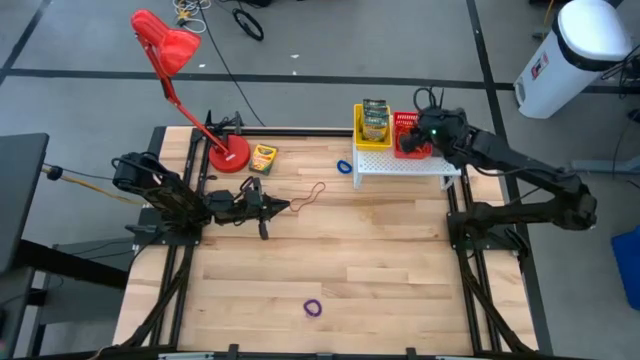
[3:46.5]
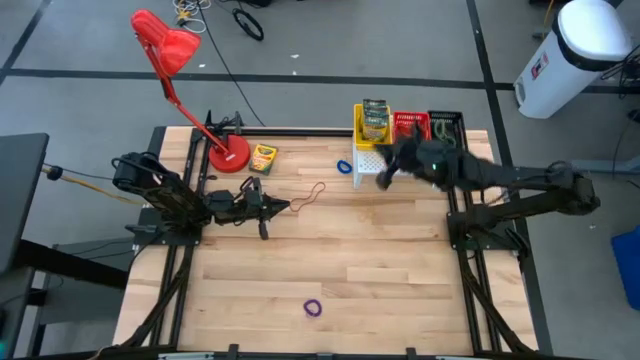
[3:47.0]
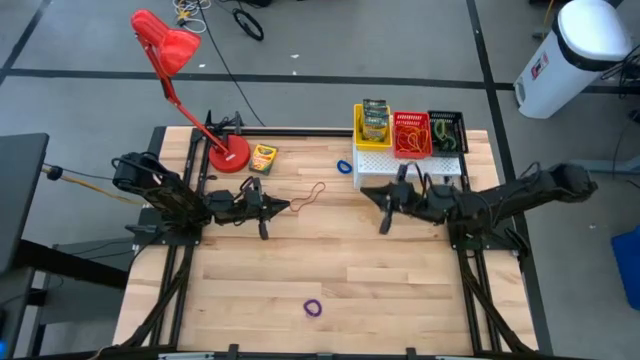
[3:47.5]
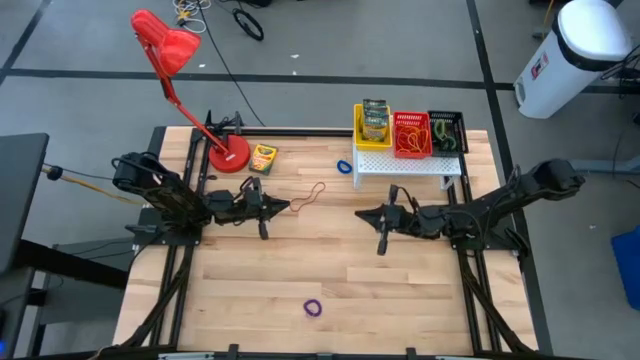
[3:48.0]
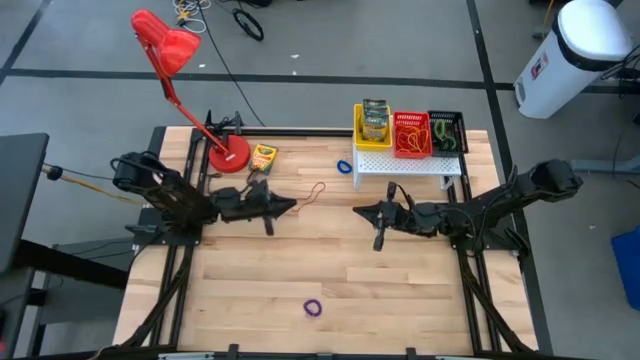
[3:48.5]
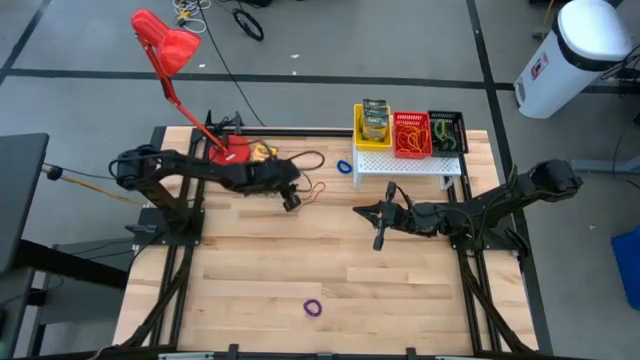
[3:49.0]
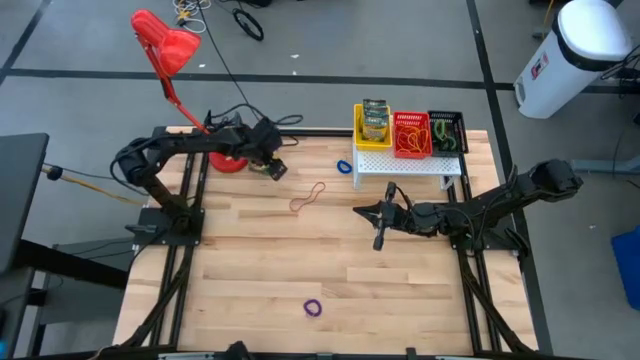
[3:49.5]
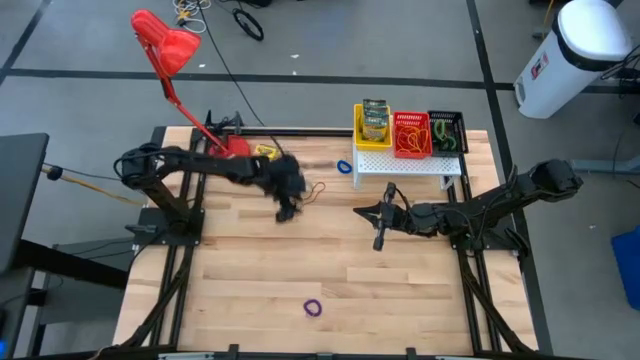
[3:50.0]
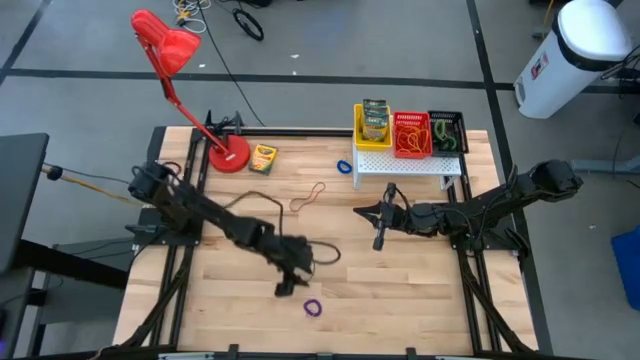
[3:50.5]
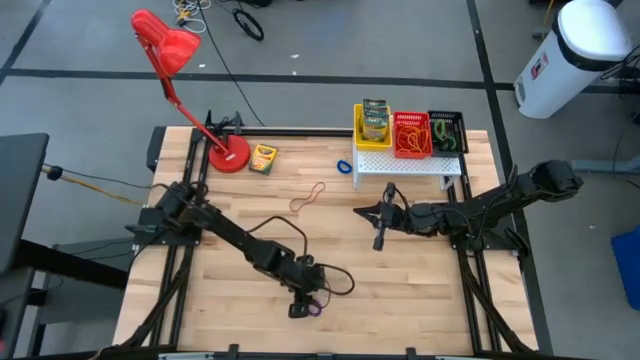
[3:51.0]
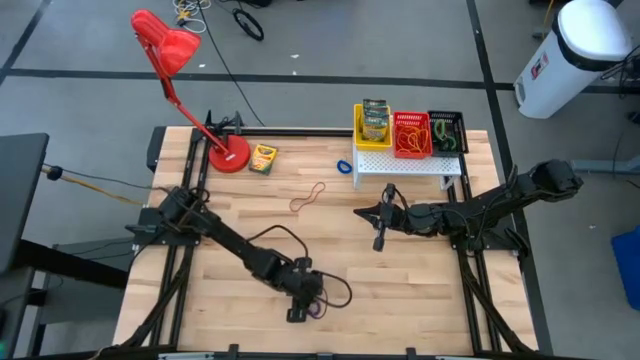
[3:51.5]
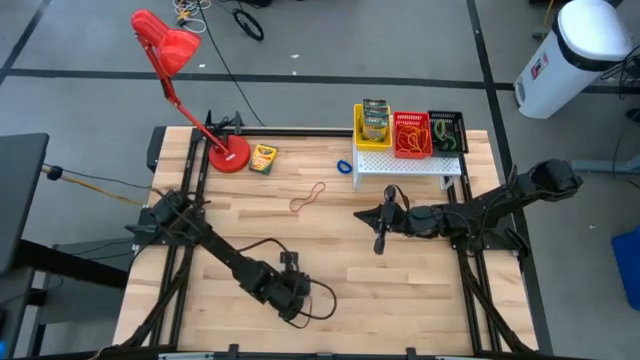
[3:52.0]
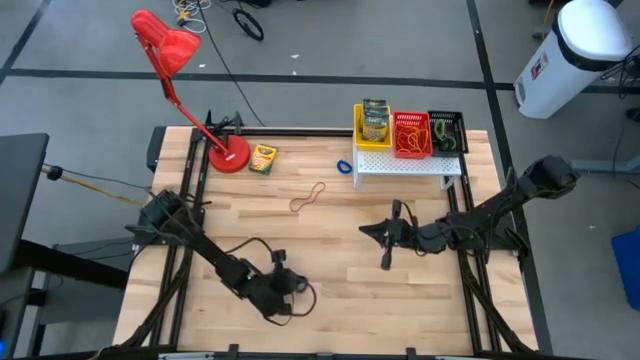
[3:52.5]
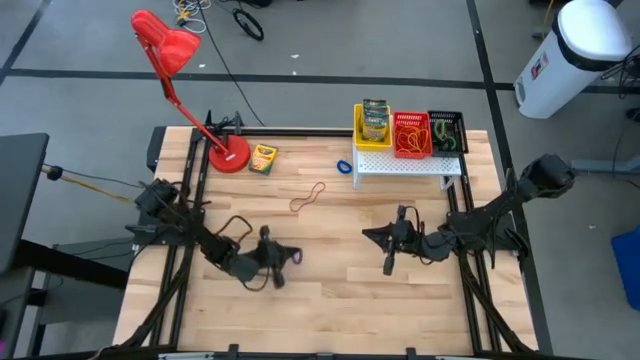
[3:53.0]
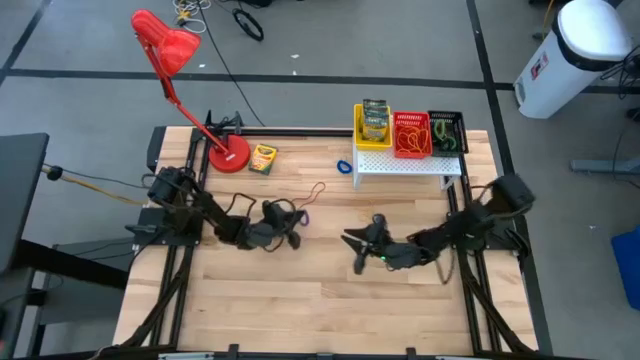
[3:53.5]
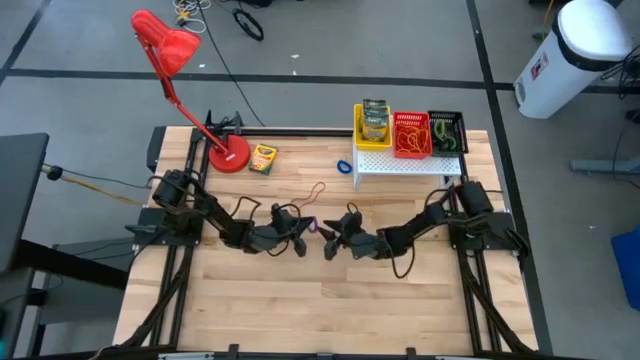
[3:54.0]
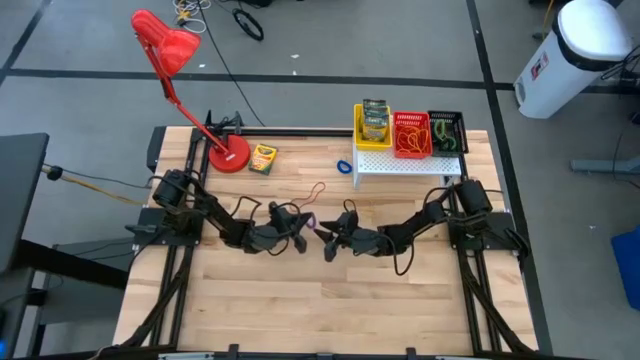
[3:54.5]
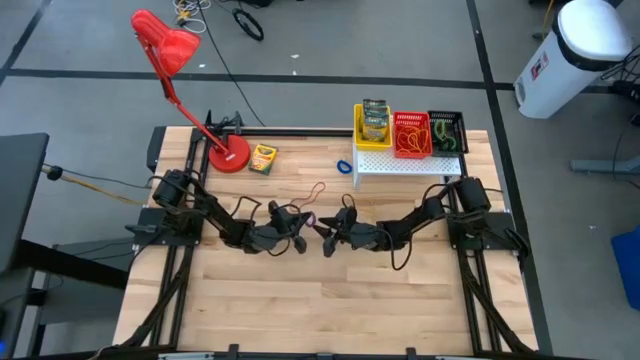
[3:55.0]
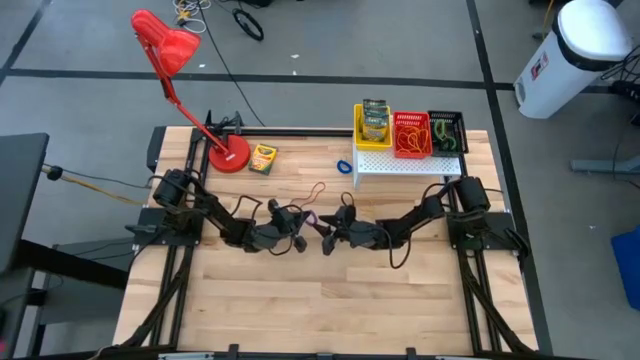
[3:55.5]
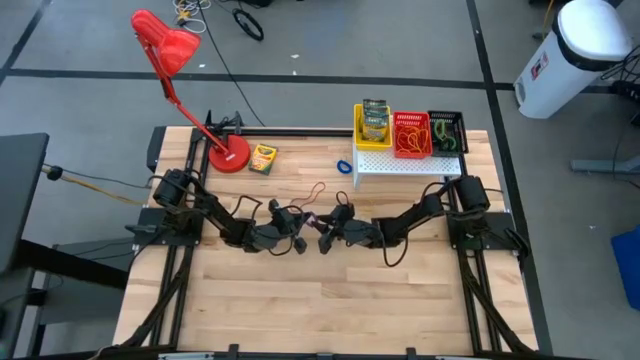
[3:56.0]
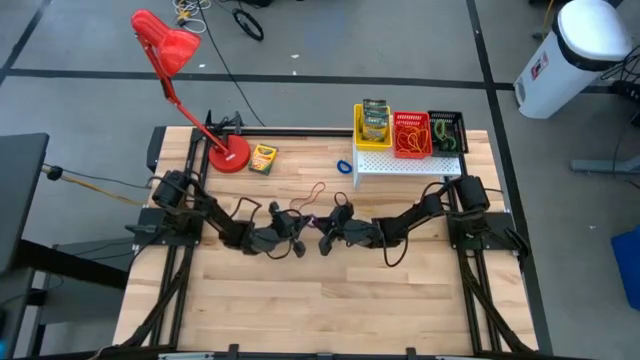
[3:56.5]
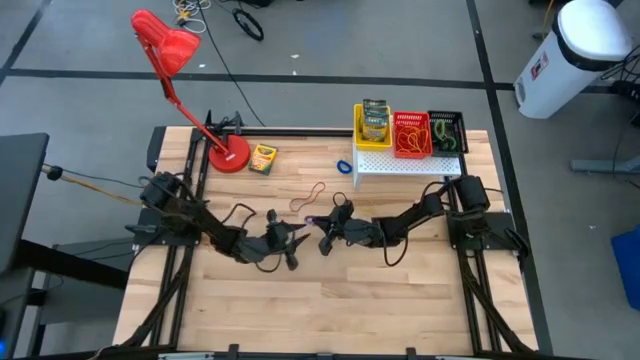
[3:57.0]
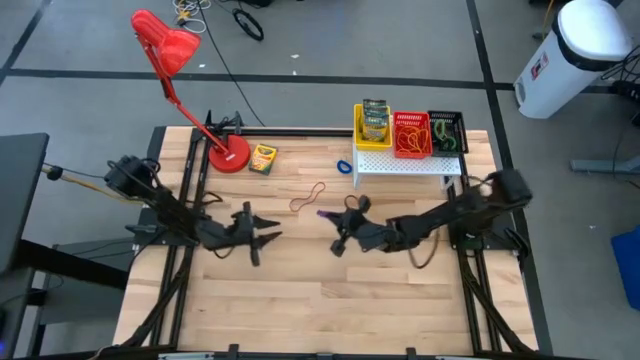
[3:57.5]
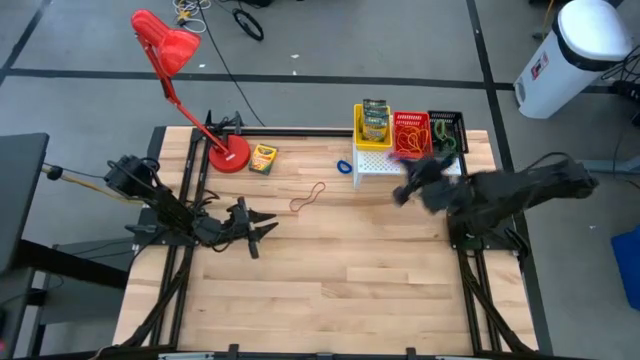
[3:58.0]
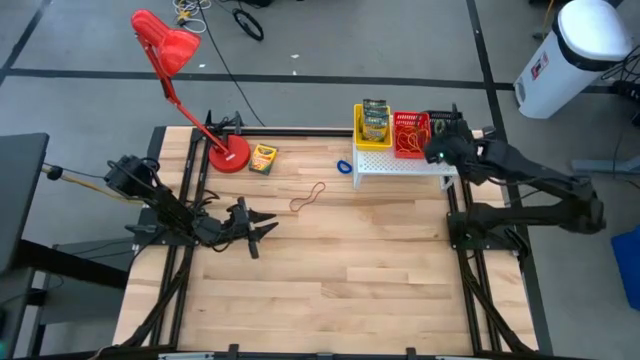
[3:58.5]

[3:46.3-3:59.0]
Task: Pick & Place Office Desk Supplies
Put the purple spring keychain on the black basket

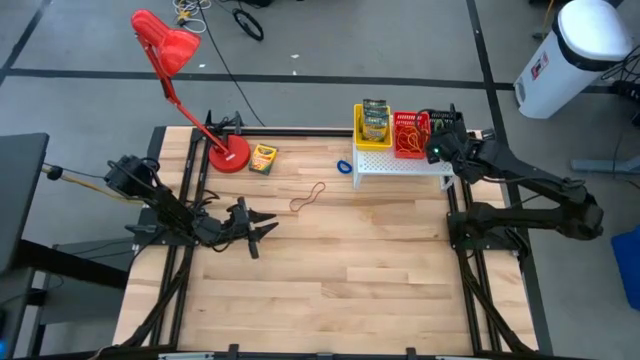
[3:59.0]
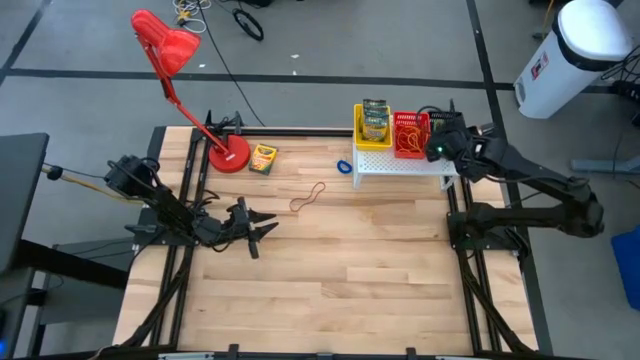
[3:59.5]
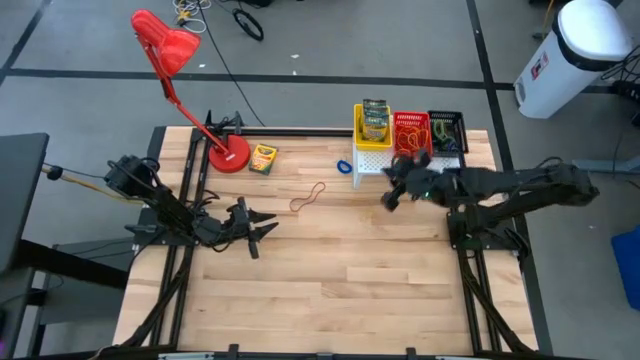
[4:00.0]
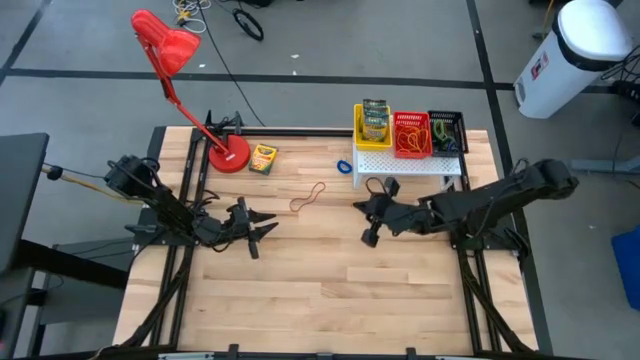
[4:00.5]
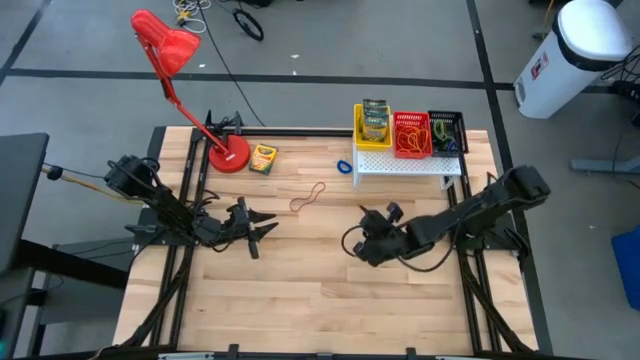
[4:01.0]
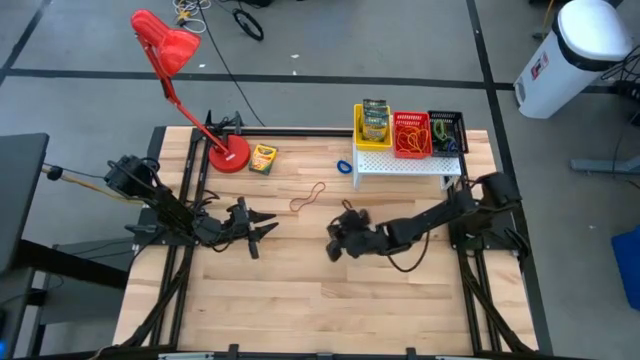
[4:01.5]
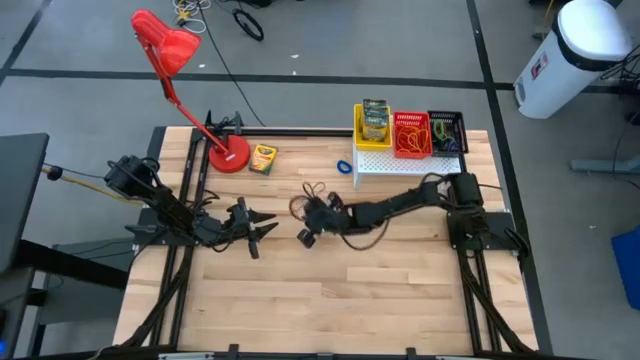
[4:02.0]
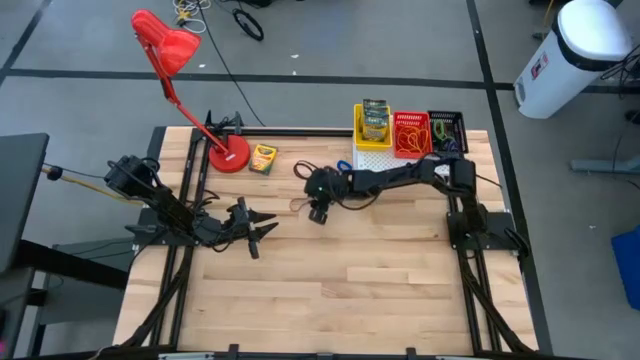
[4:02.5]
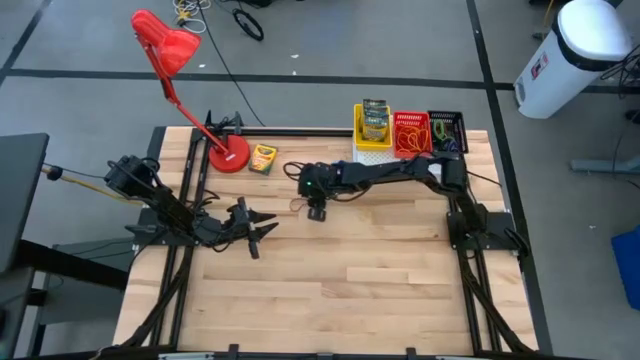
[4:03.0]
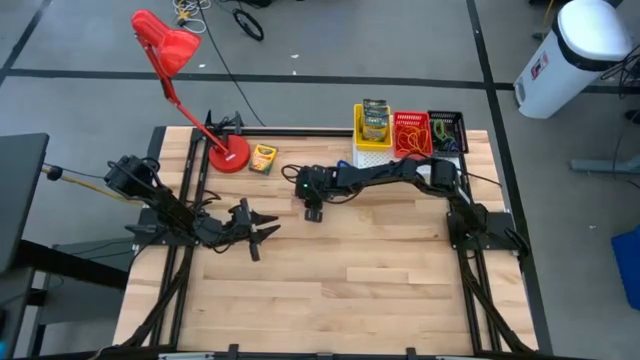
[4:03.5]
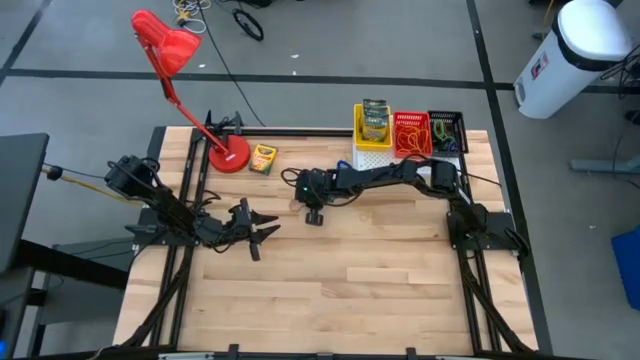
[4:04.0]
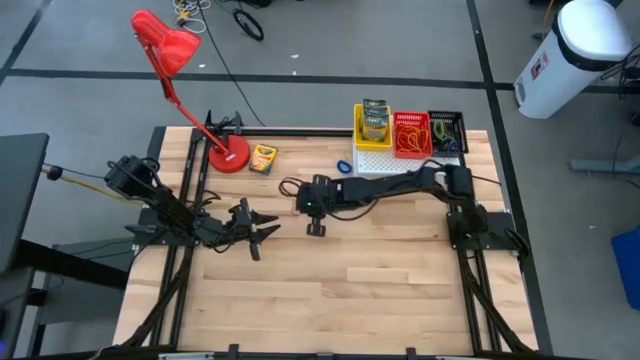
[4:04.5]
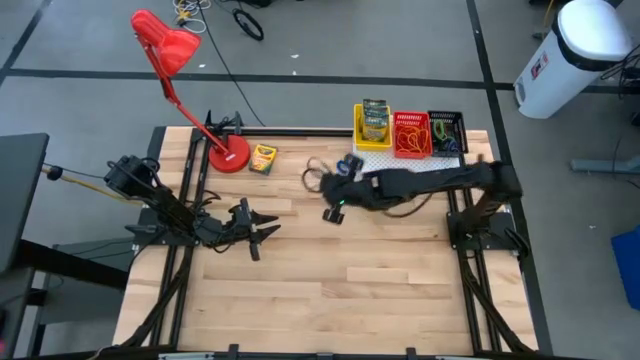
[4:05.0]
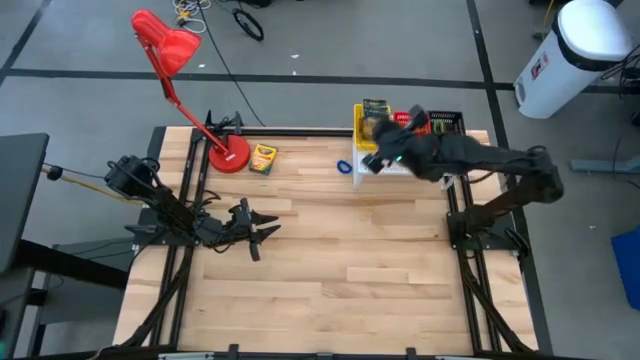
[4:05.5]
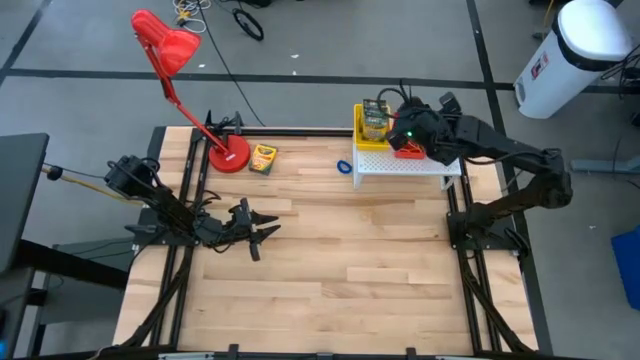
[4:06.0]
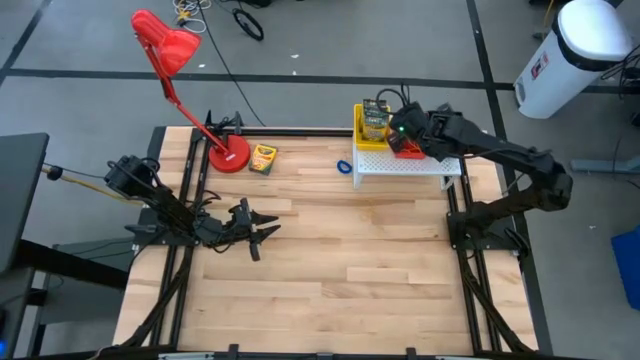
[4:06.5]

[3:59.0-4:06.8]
Put the red rubber band on the red basket

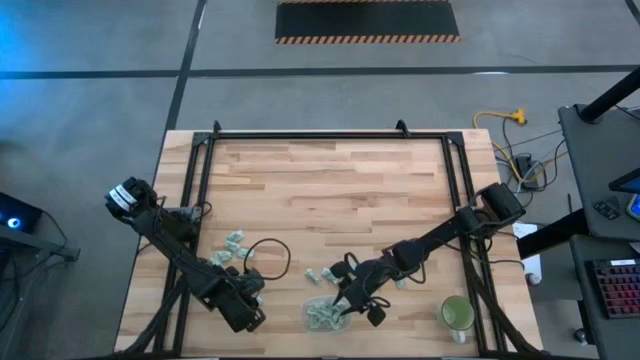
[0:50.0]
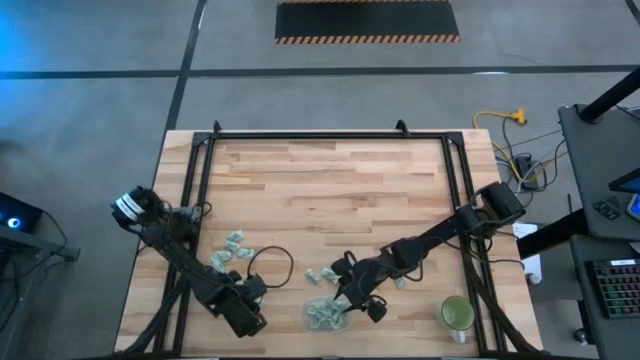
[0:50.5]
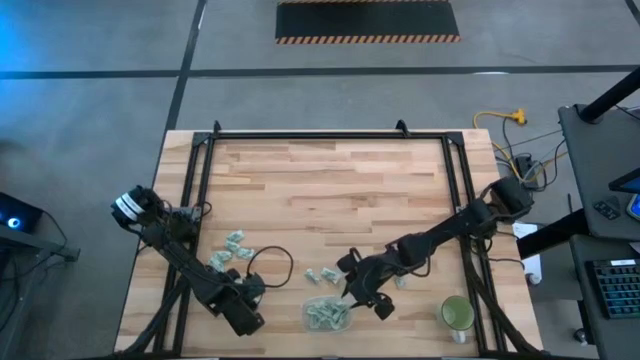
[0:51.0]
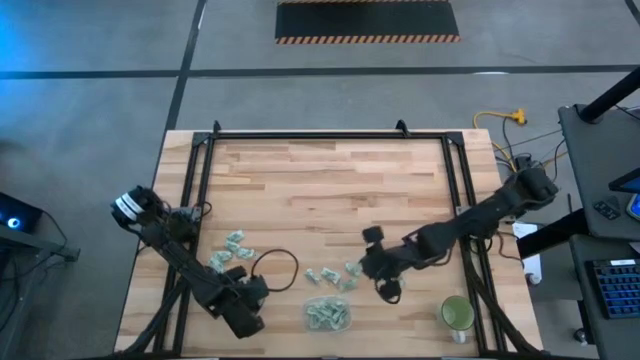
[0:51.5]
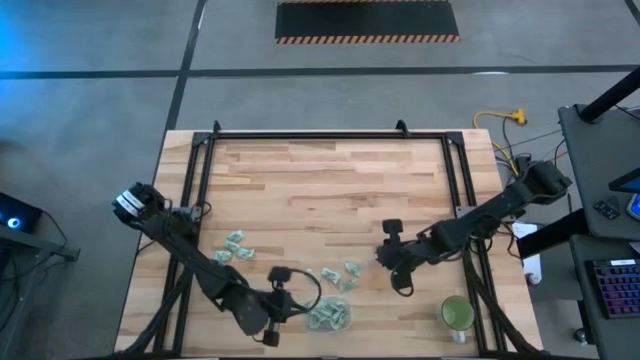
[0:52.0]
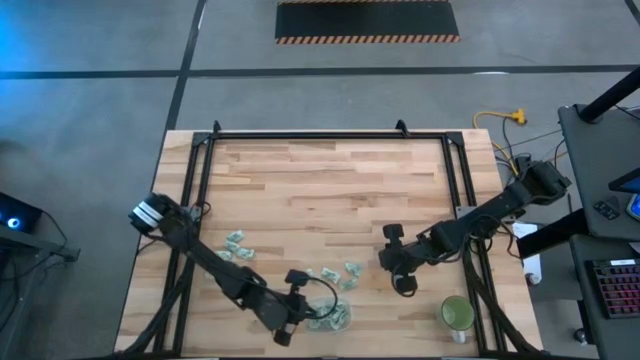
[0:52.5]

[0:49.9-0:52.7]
Task: Pick and place Stevia / Truvia into bins
Put the stevia packet into the transparent container
